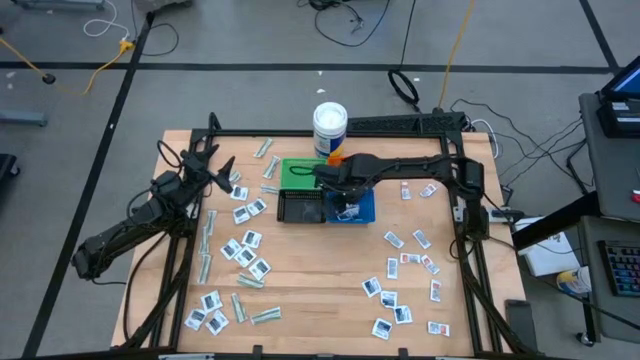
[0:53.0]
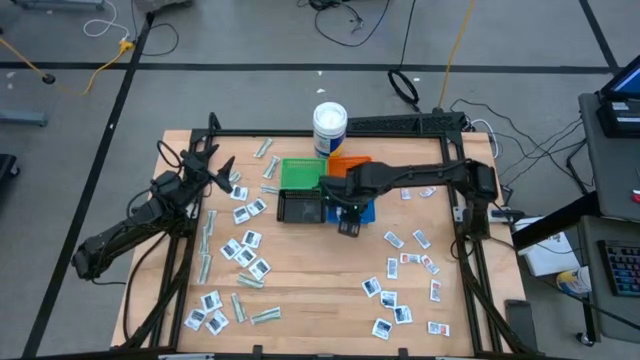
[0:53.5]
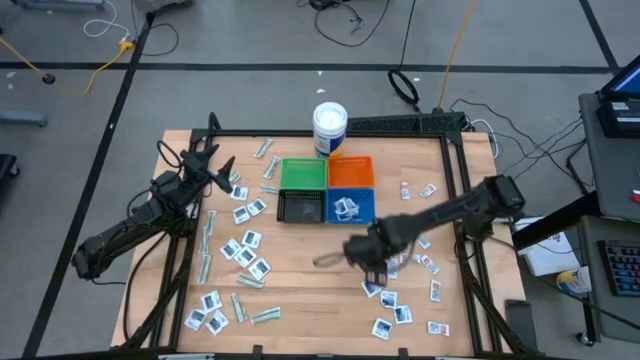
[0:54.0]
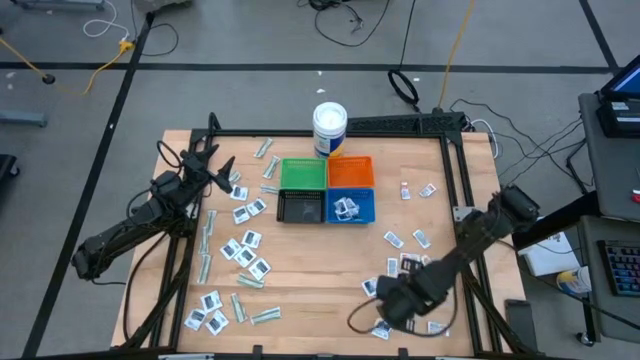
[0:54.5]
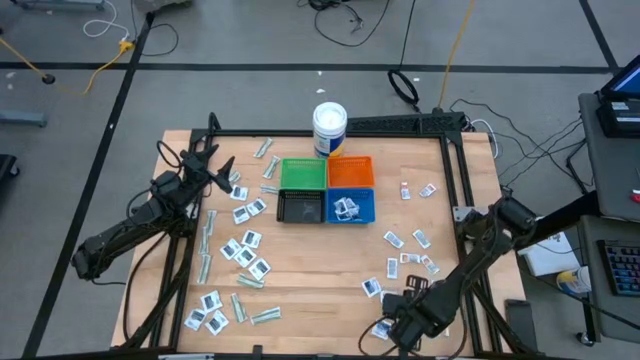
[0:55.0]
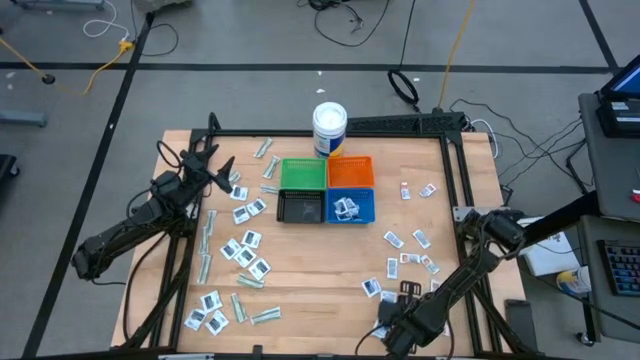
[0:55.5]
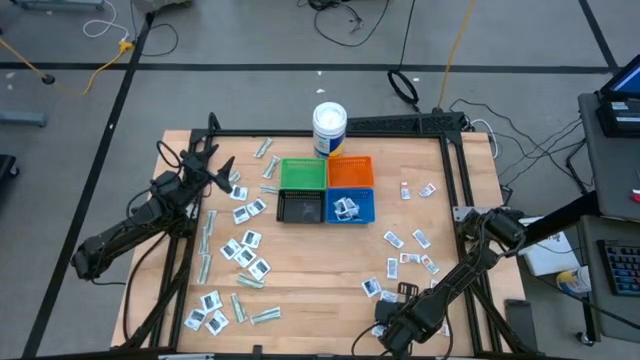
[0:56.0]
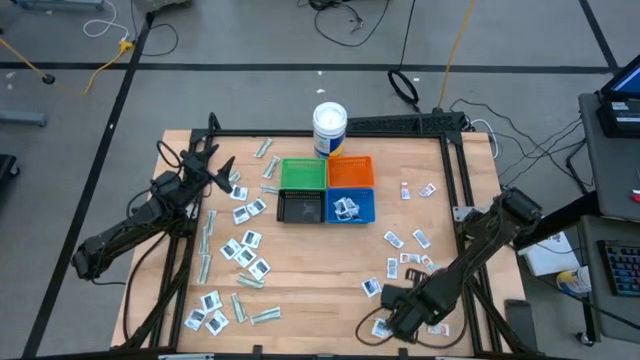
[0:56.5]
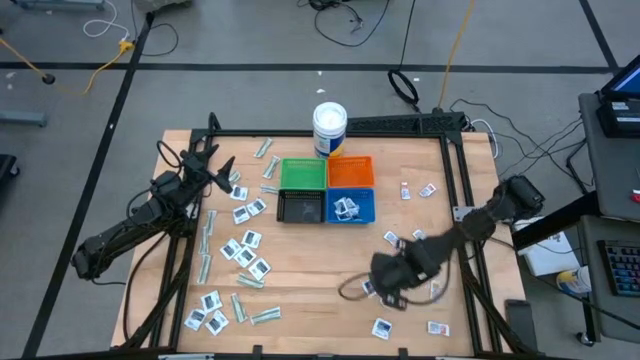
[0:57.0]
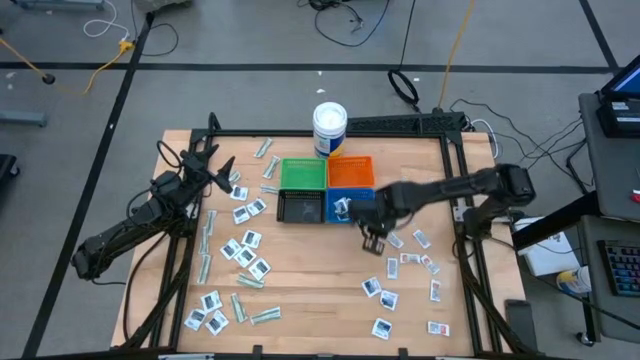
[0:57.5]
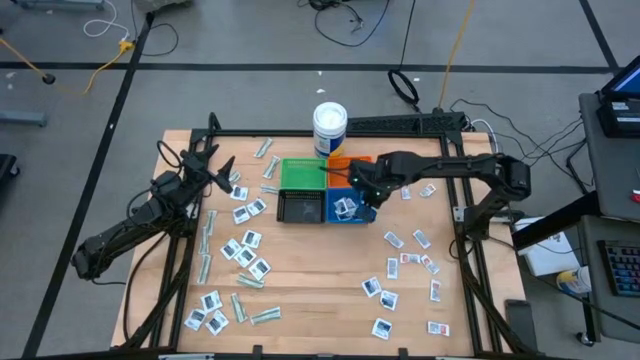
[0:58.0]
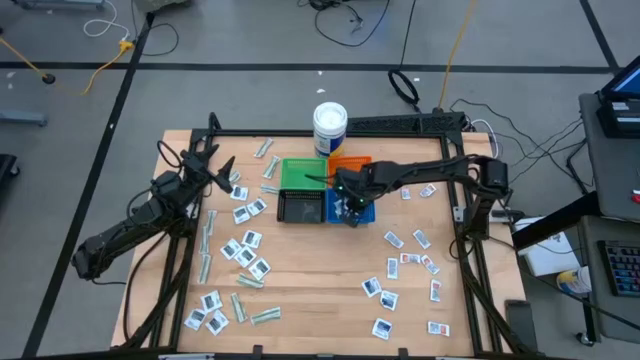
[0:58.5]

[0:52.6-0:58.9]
Task: Pick & Place First Aid Supplies
Put the blue alcohol pad into the blue basket

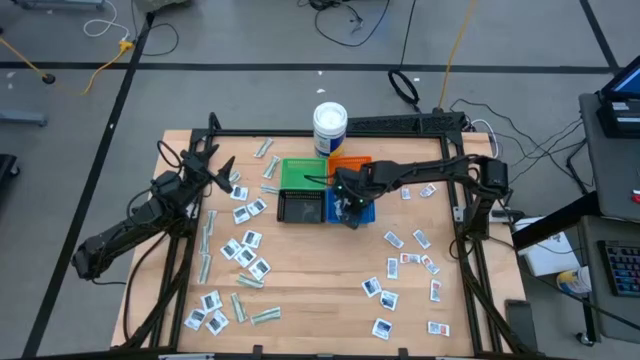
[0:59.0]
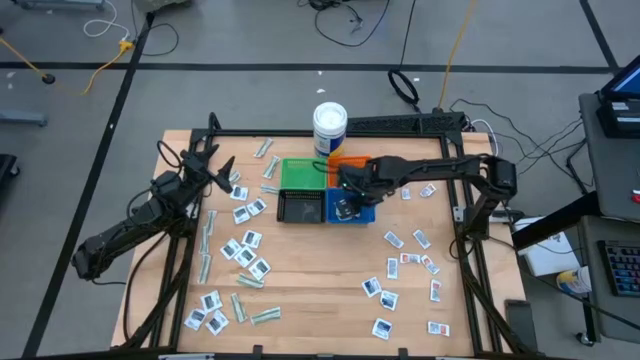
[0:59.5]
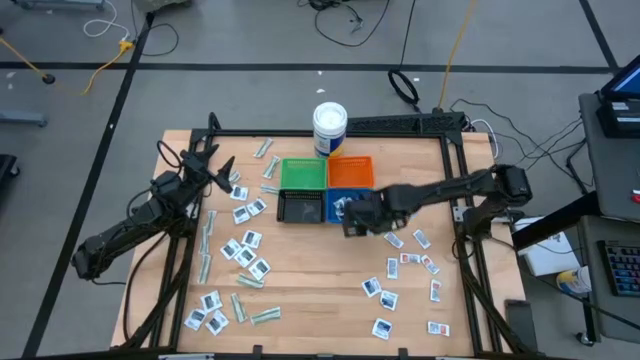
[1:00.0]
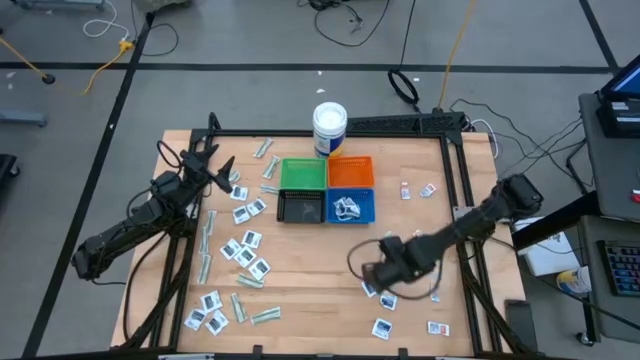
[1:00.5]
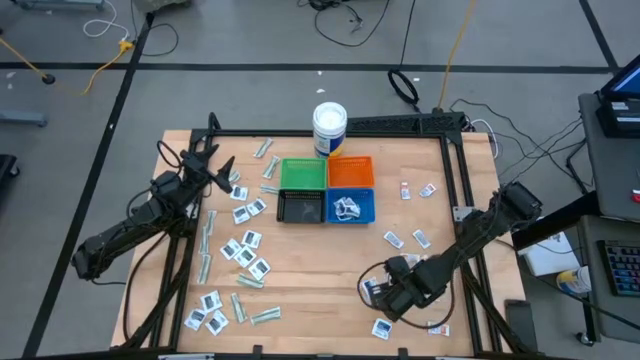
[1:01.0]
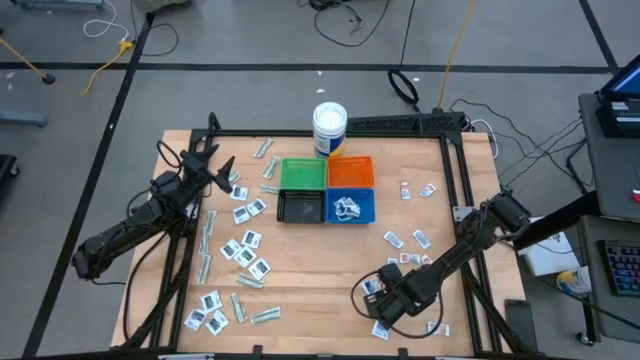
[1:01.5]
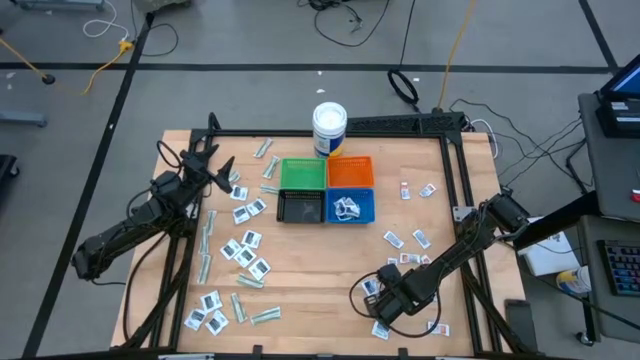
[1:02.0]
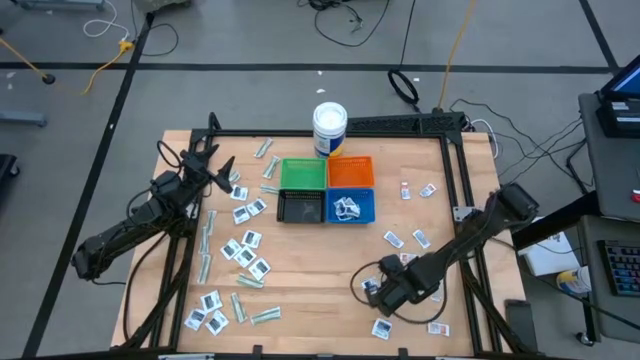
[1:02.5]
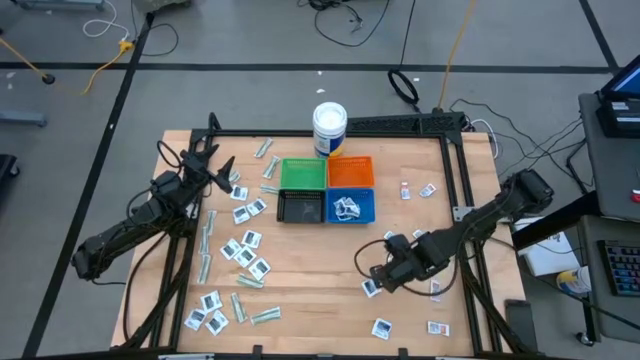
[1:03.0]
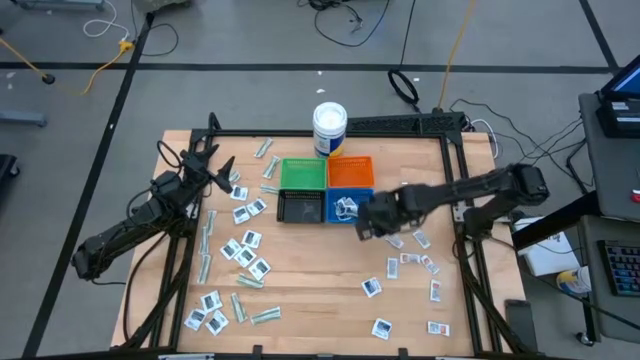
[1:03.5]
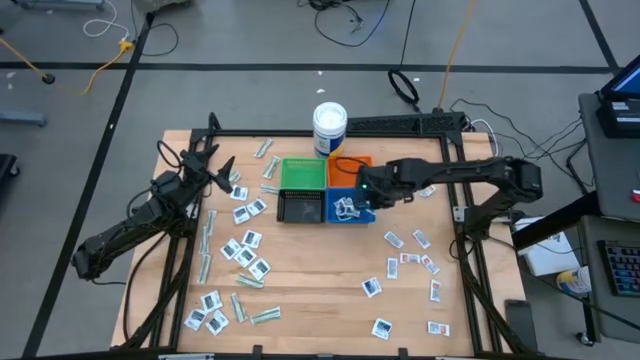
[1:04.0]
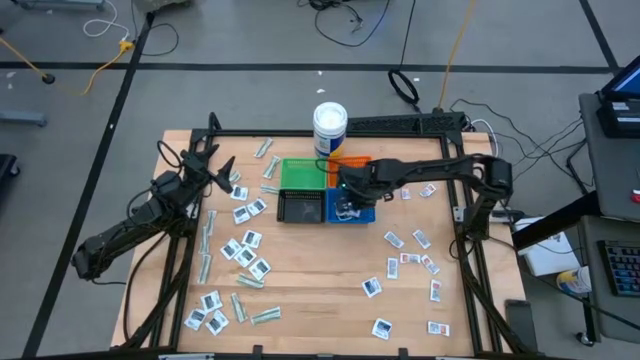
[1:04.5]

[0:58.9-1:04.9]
Put the blue alcohol pad into the blue basket

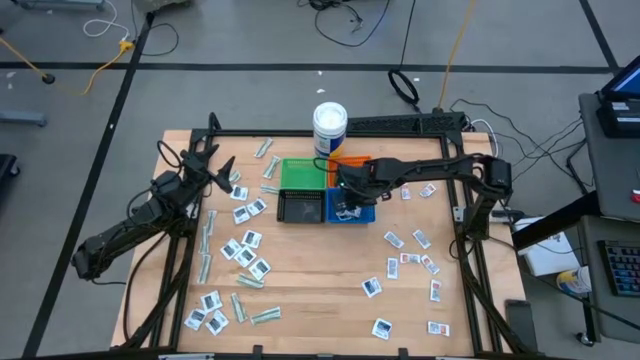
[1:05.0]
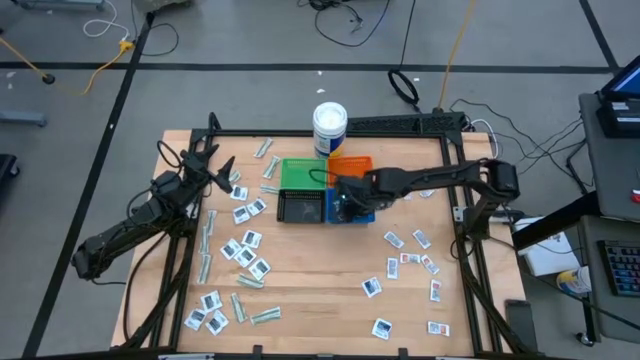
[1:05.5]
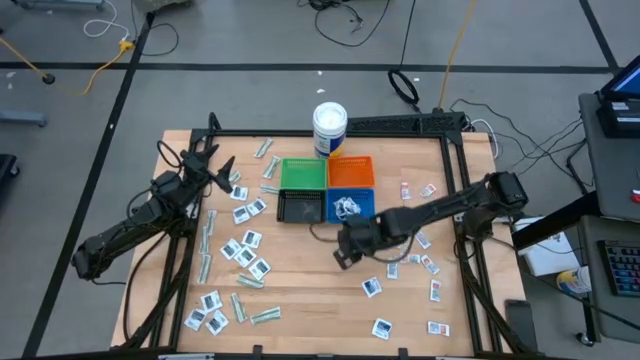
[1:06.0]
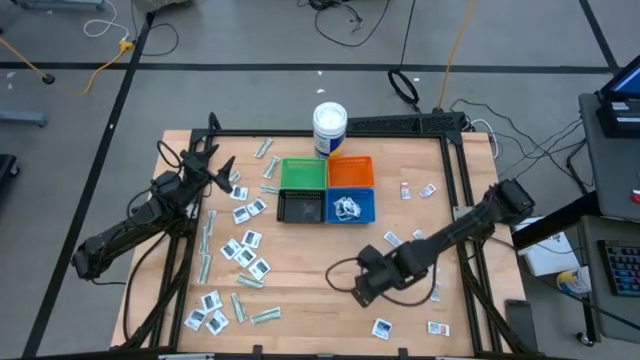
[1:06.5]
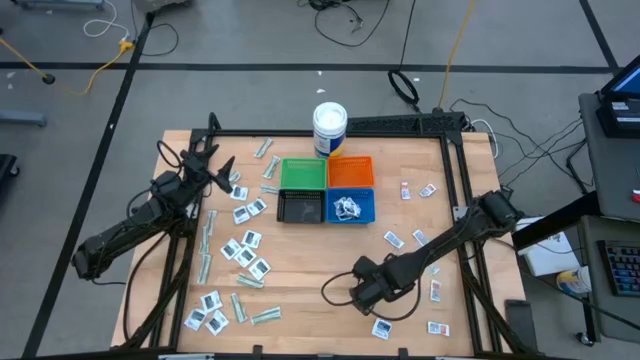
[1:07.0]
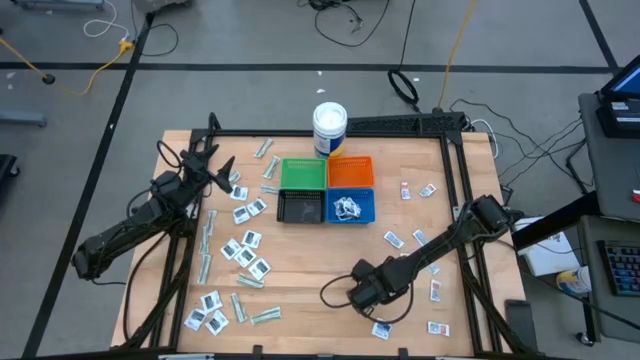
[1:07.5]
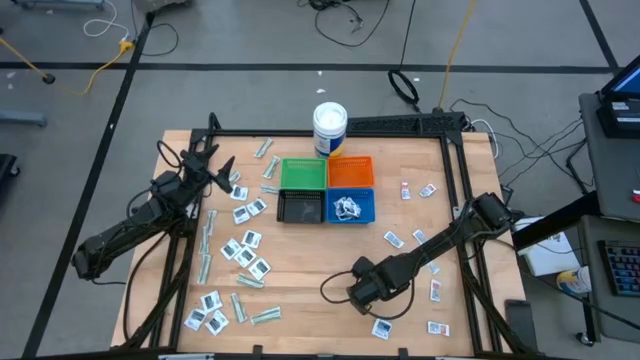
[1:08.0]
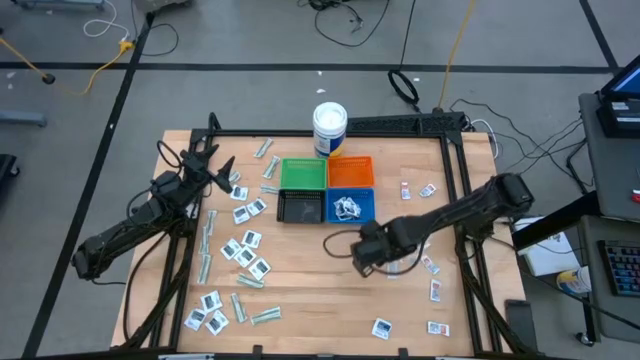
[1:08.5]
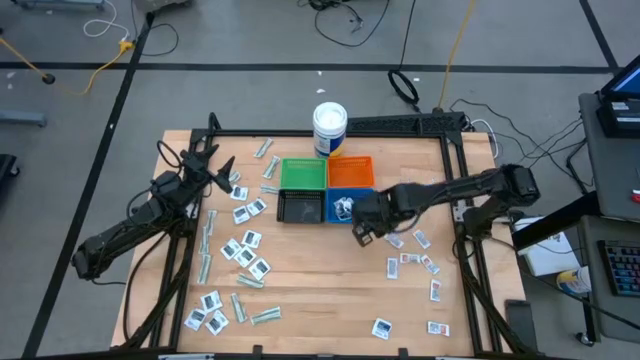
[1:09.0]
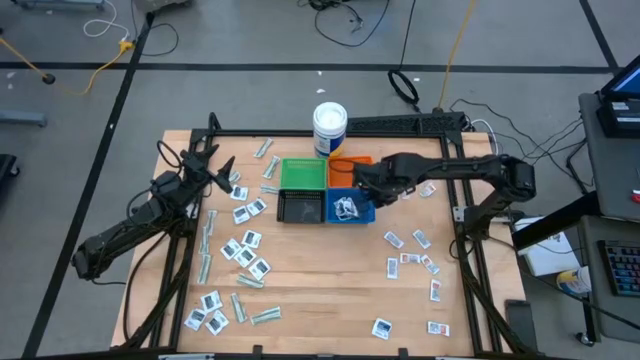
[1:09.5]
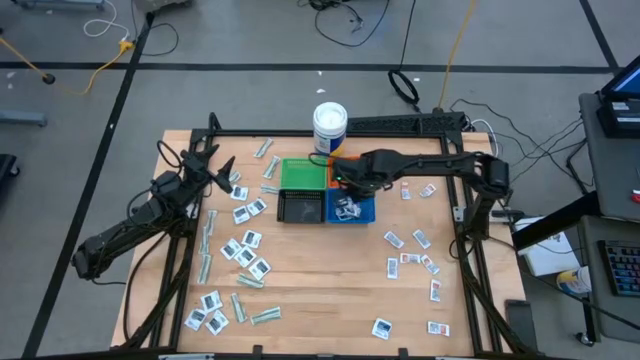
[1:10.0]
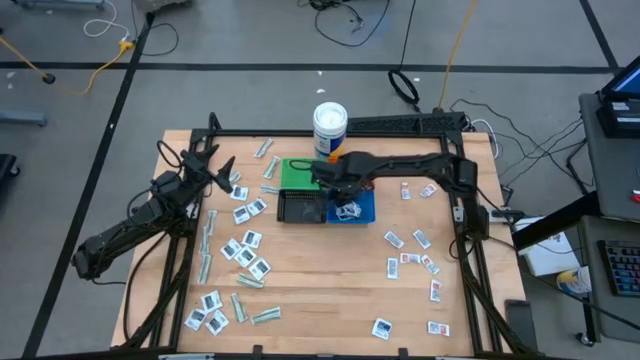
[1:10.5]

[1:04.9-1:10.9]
Put the blue alcohol pad into the blue basket

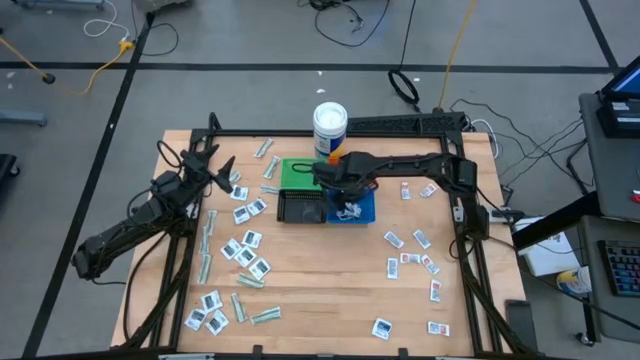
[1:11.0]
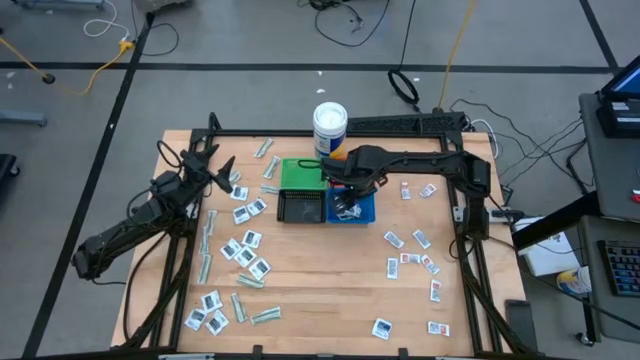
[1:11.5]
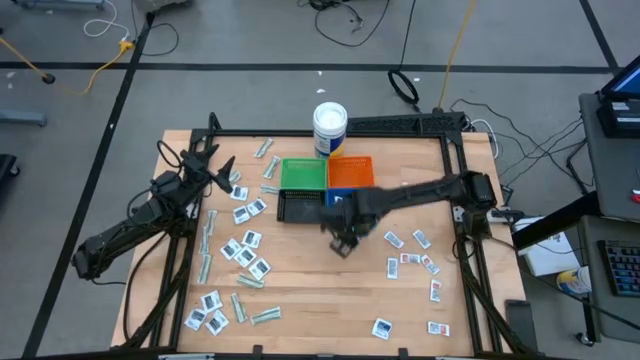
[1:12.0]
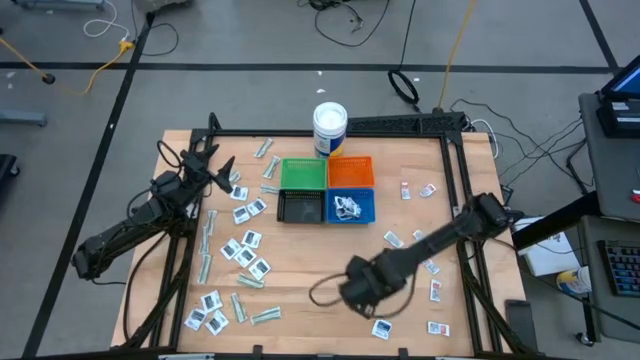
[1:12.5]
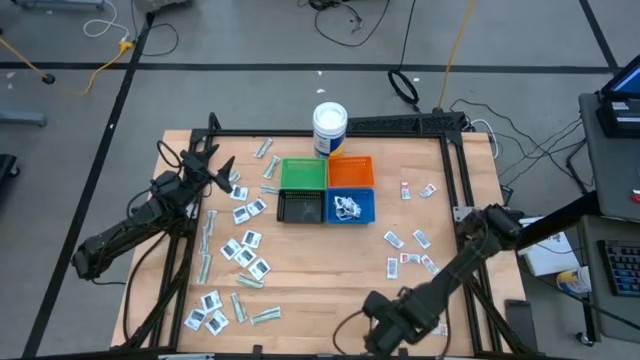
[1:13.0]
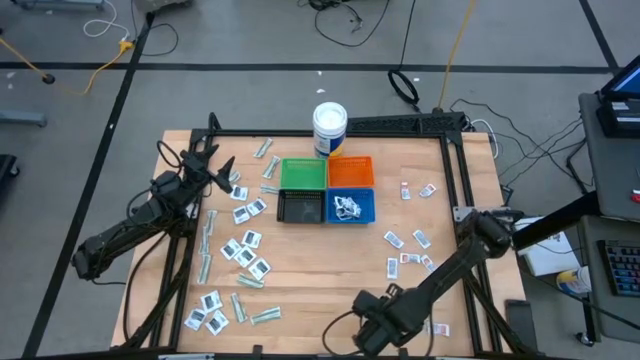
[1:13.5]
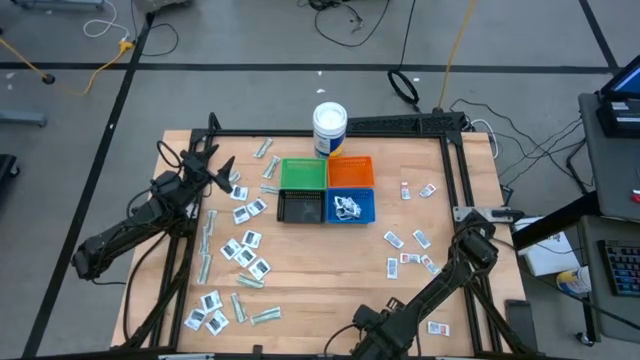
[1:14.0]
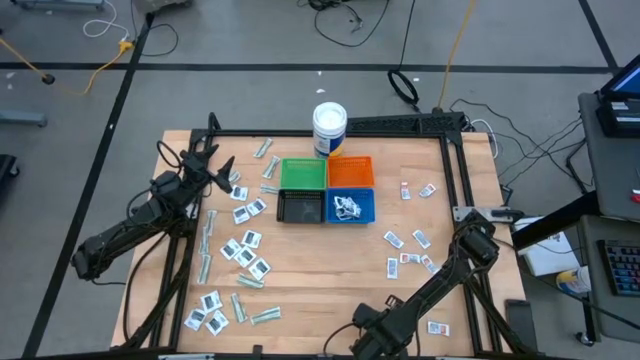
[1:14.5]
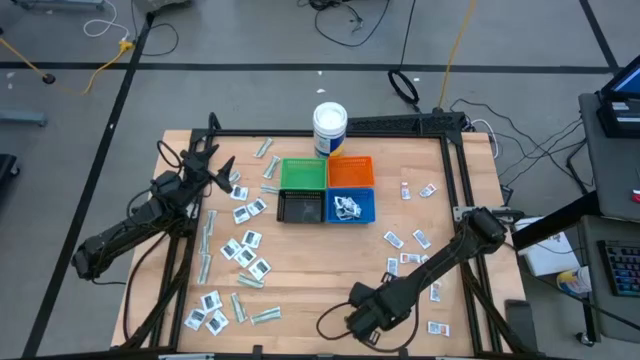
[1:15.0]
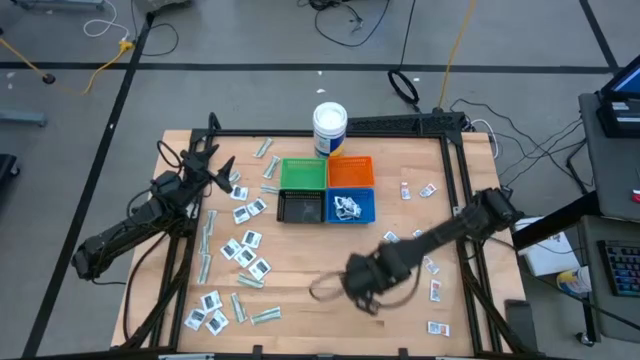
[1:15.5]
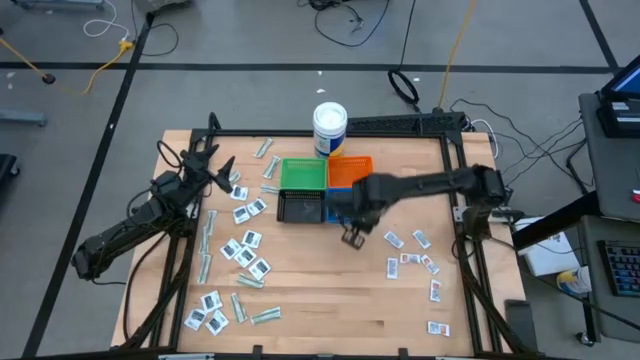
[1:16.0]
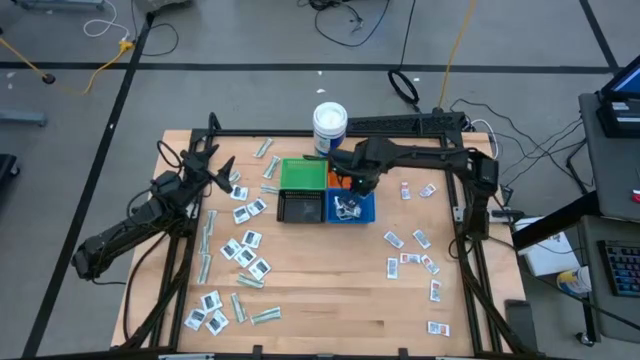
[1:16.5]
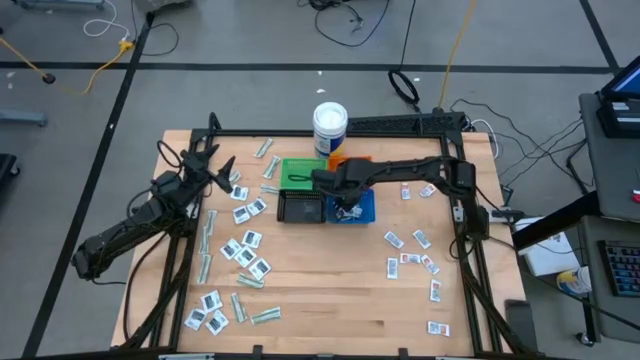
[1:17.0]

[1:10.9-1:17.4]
Put the blue alcohol pad into the blue basket
